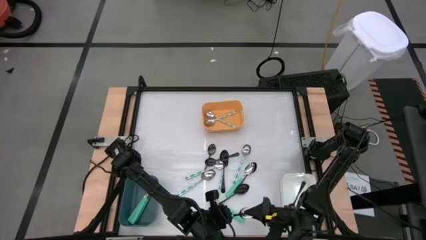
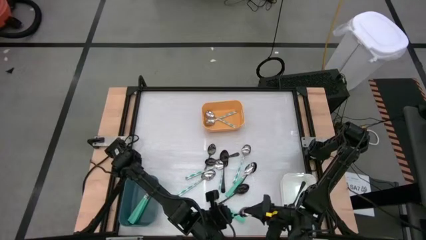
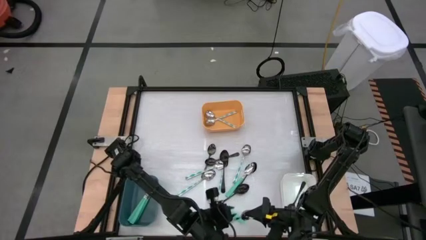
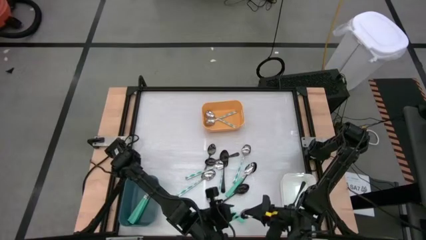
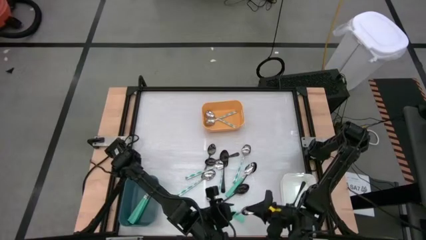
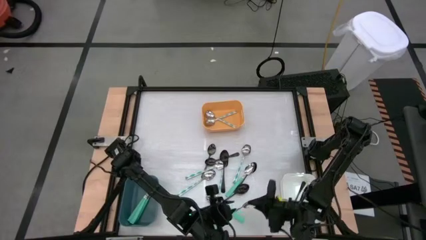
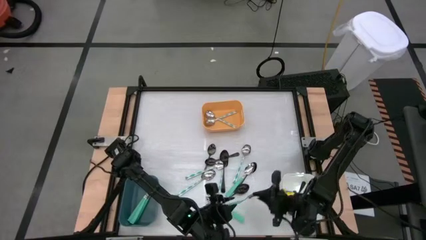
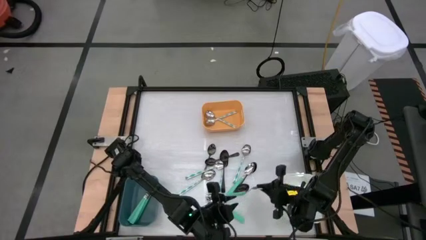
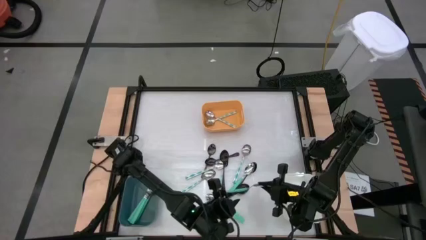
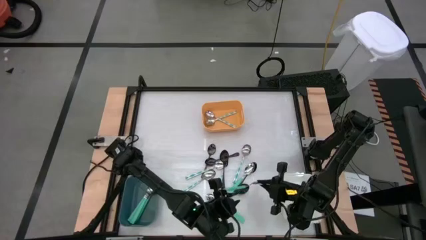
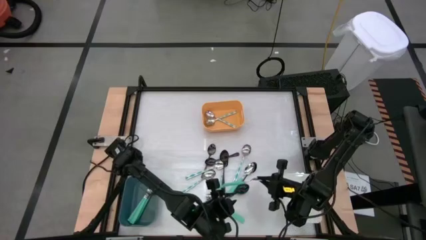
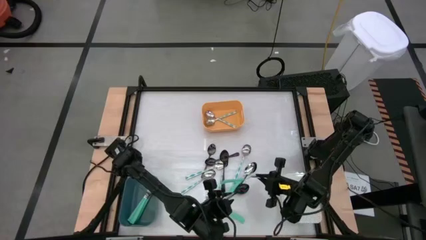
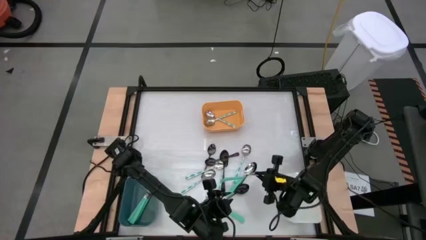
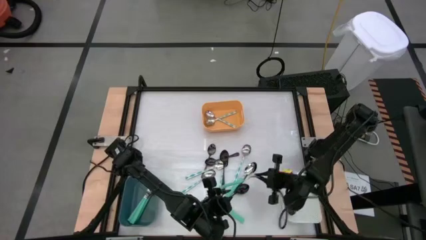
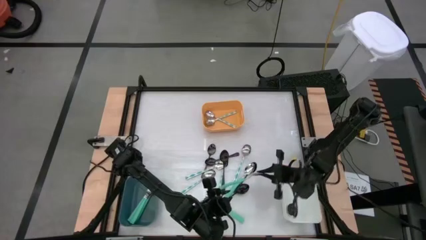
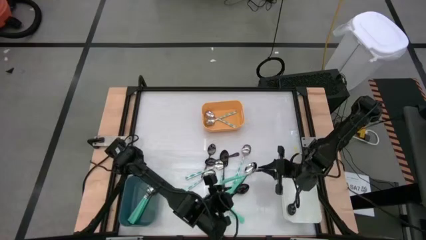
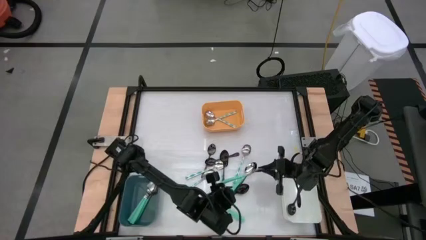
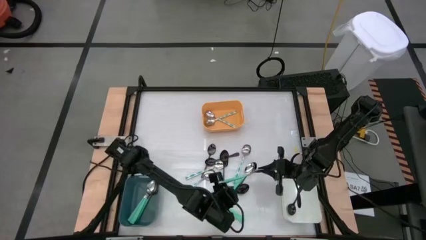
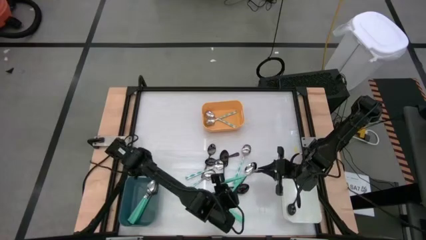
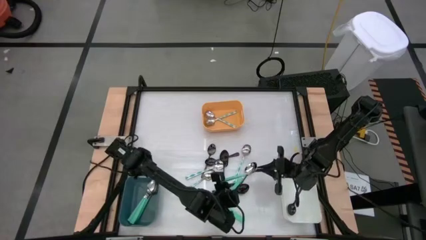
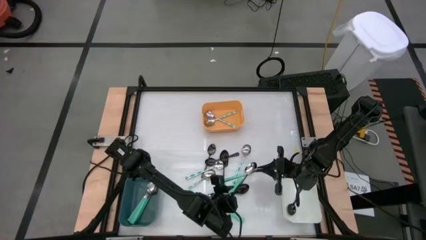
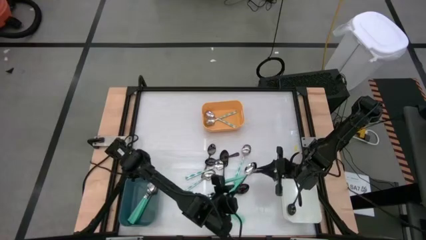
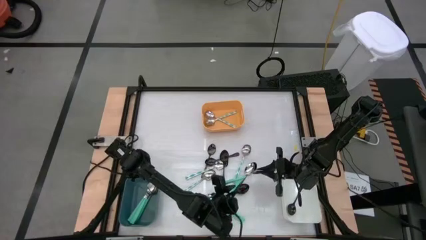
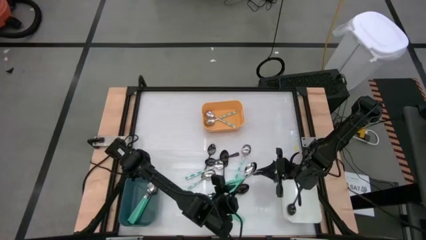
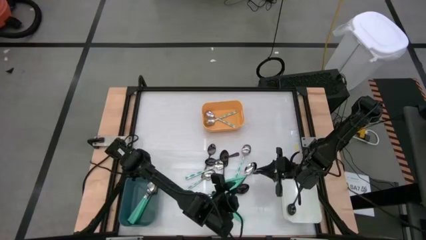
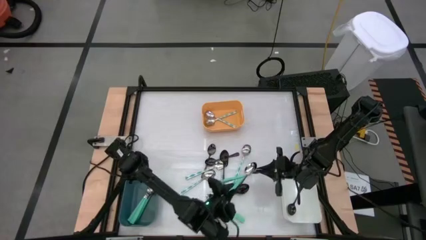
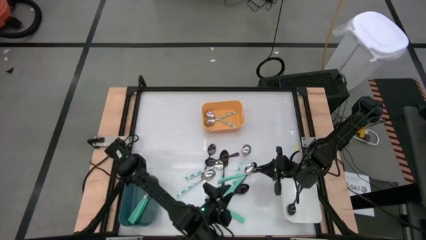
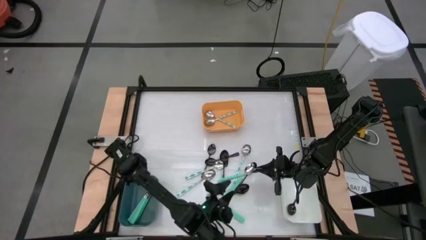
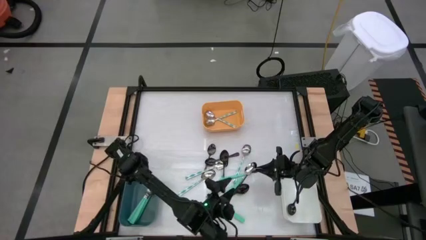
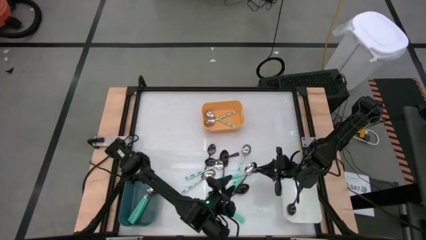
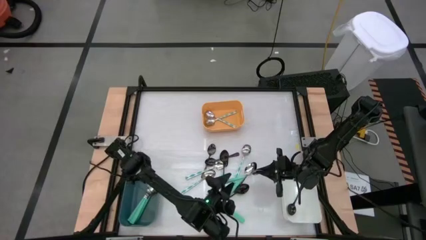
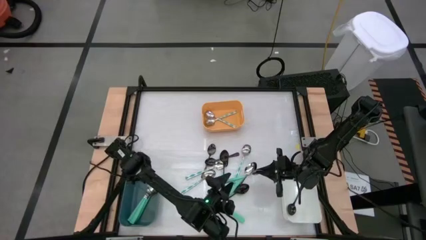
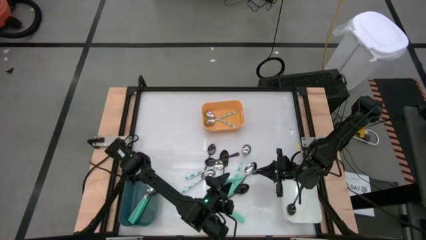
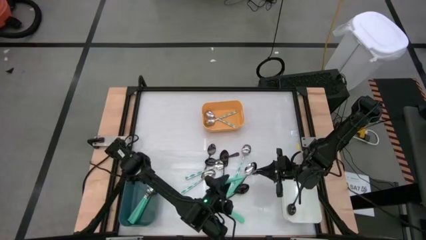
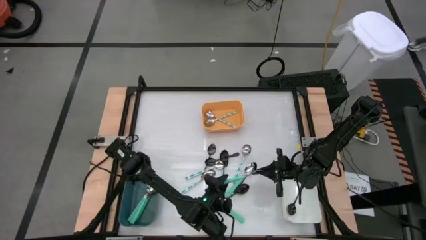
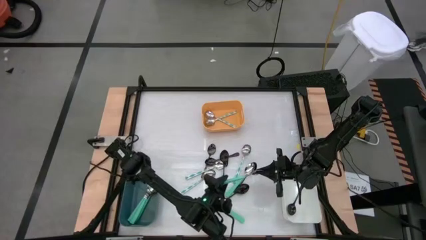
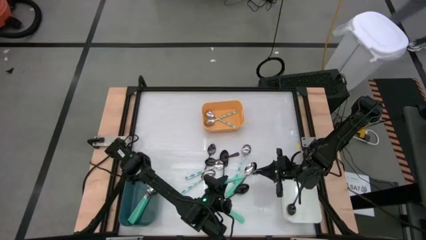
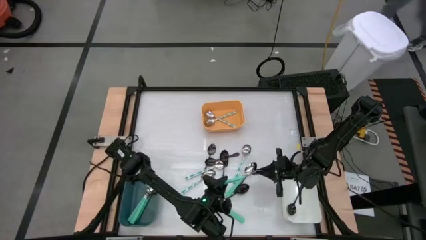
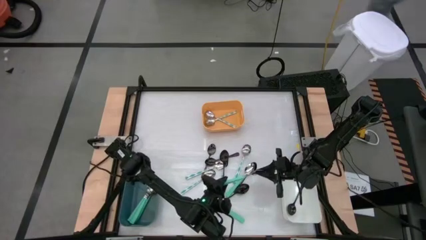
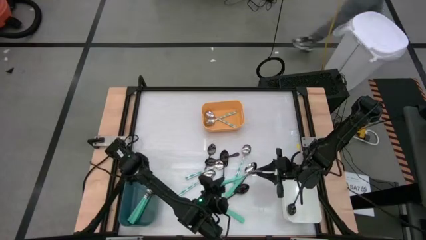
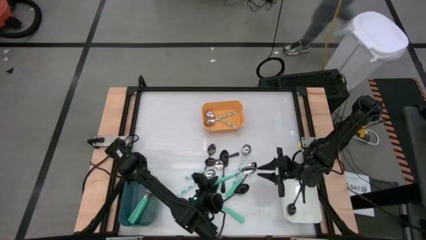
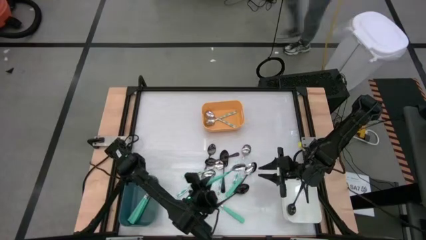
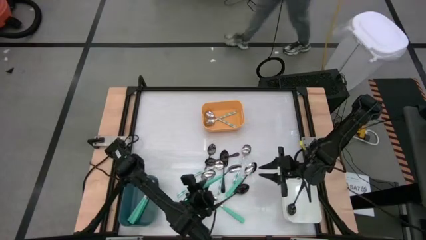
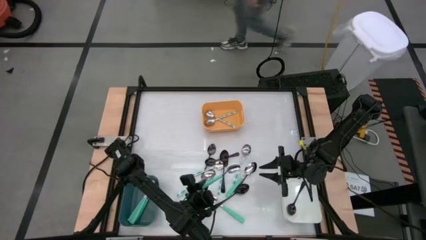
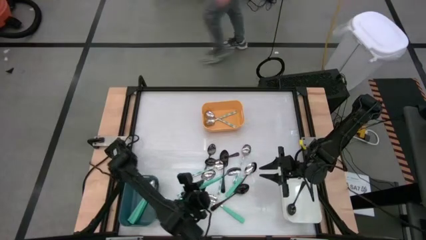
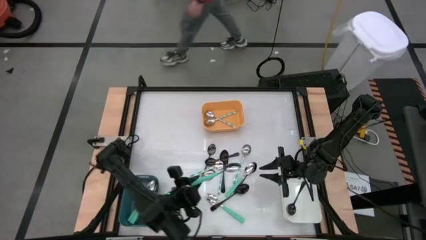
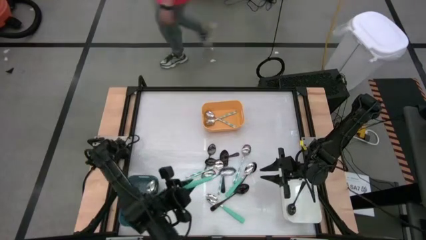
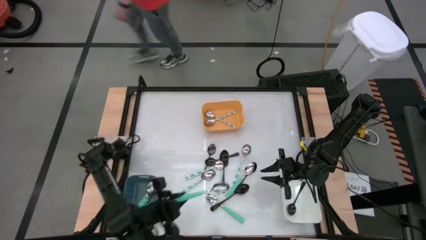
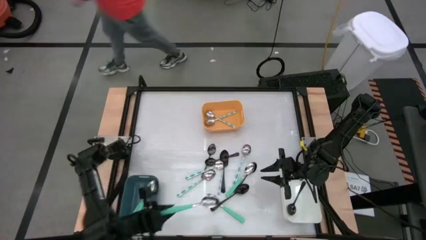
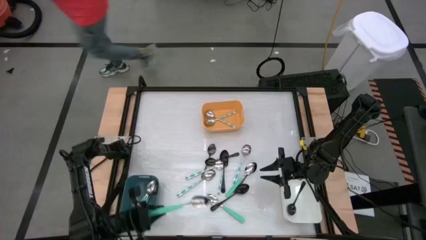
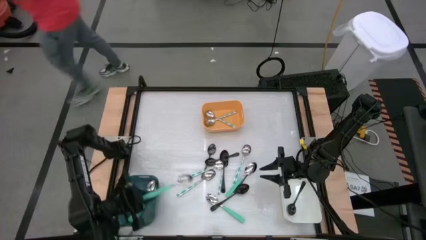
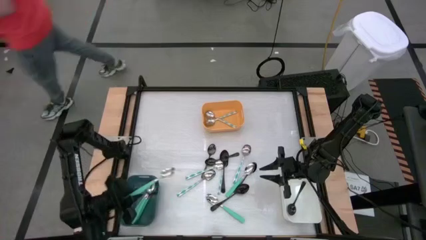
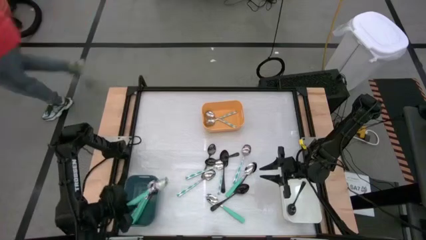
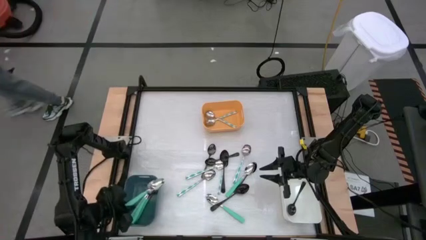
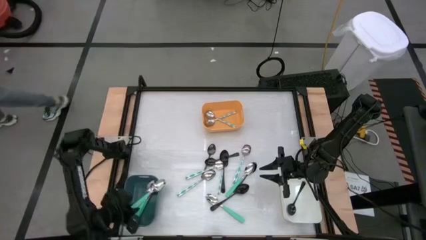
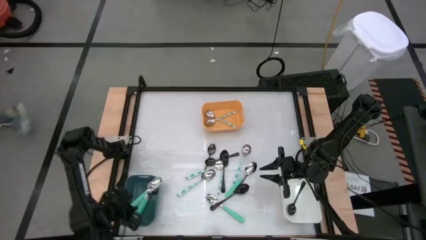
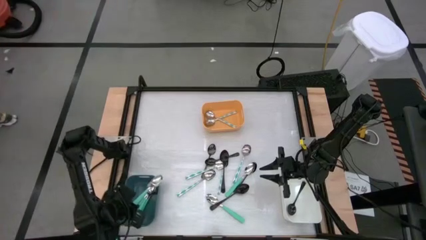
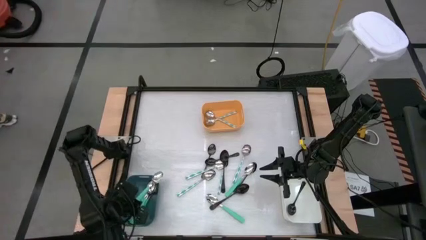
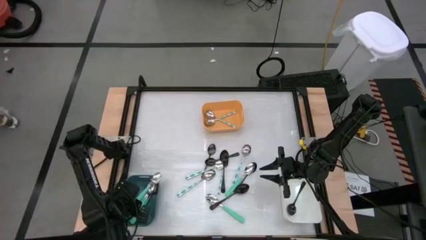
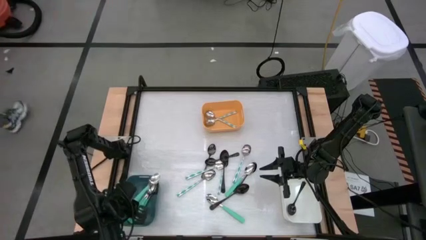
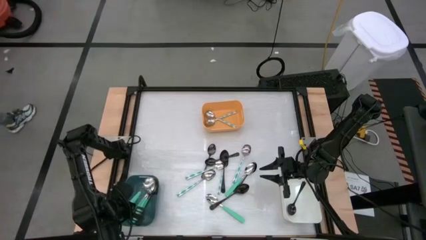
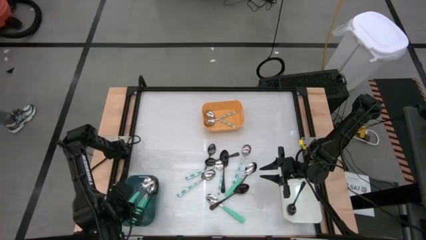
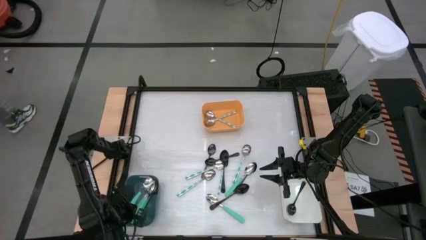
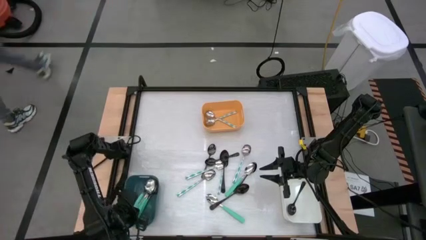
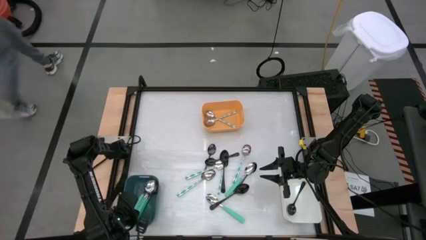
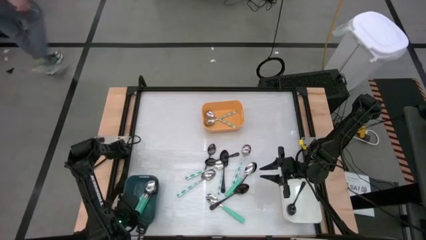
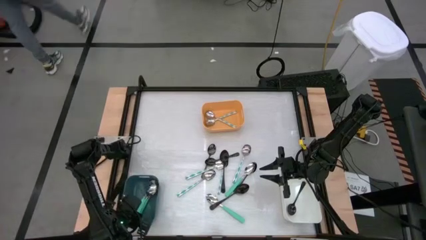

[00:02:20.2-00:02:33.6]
Task: Sort silverware by color (type)
Put the green spoon into the blue bin
